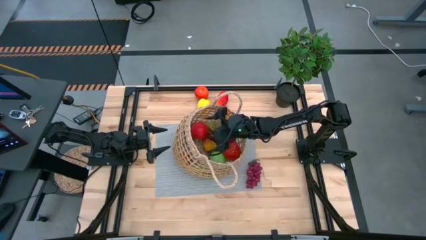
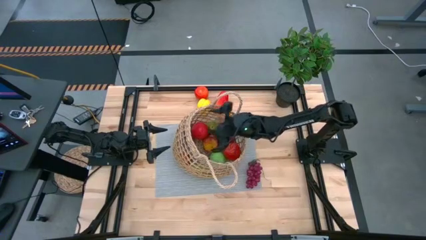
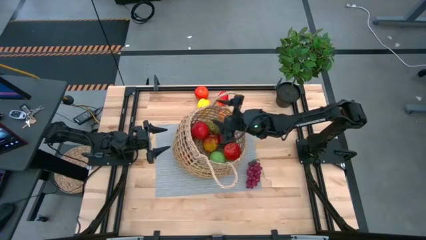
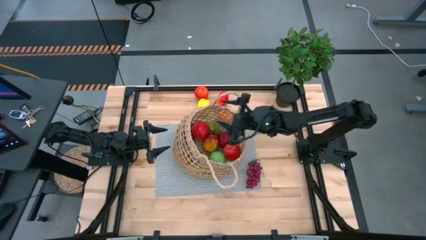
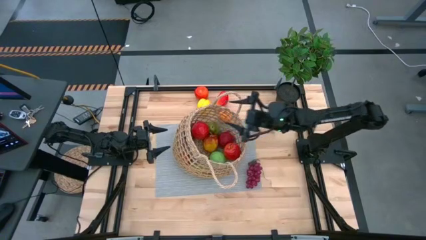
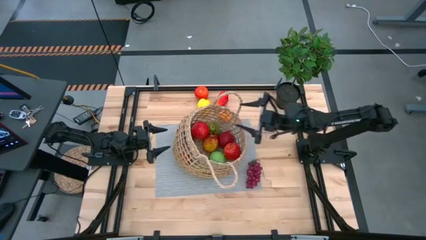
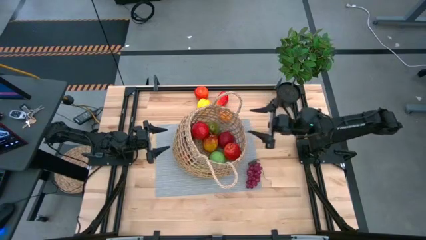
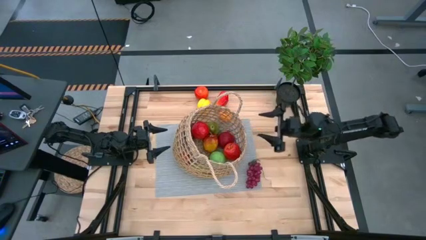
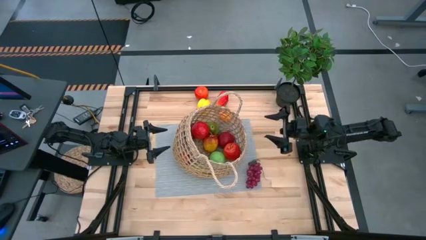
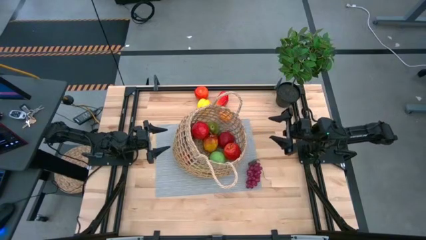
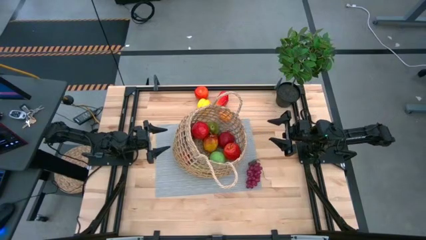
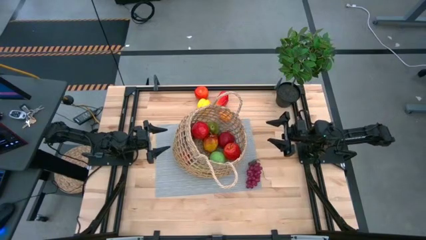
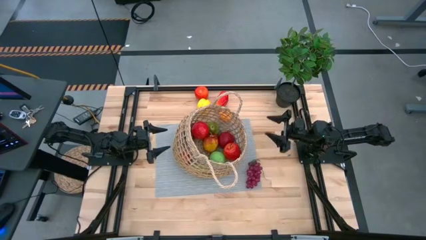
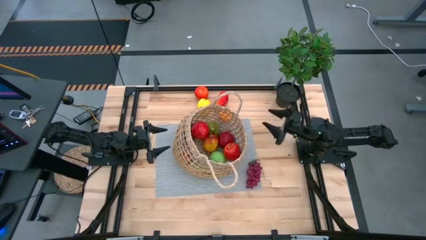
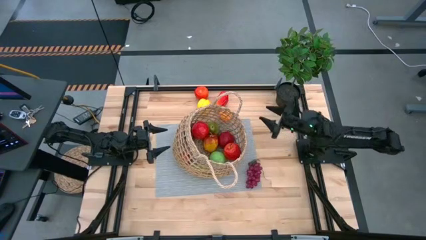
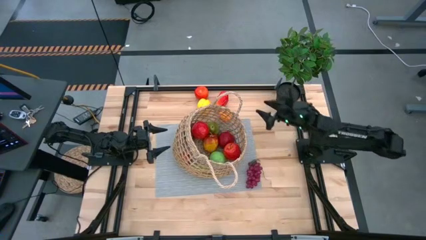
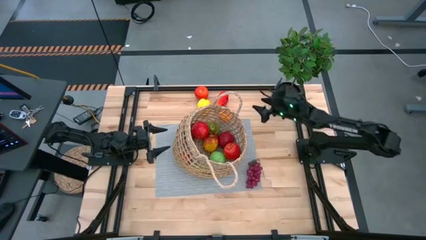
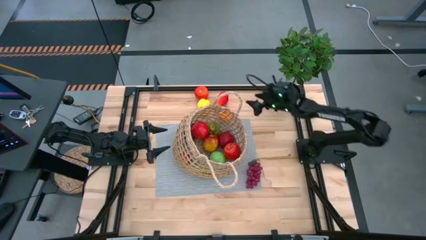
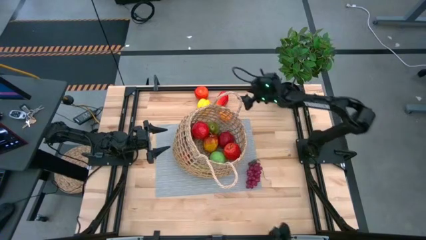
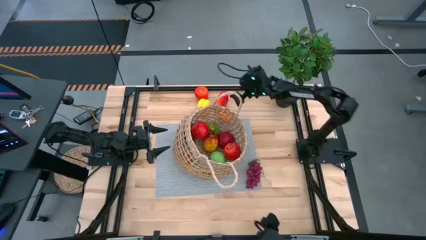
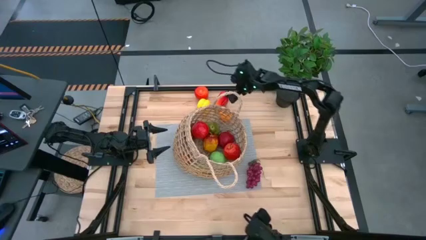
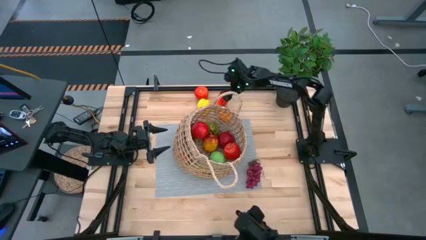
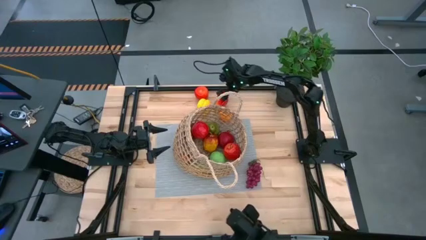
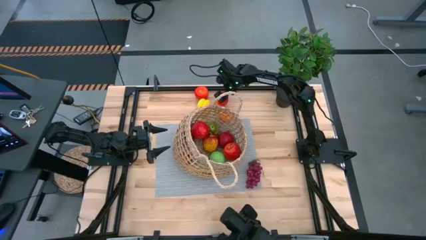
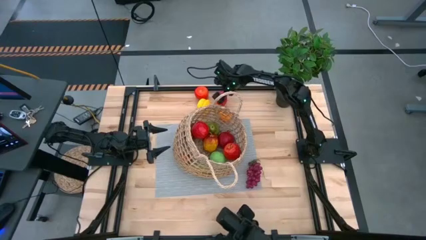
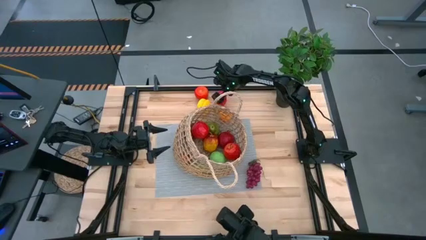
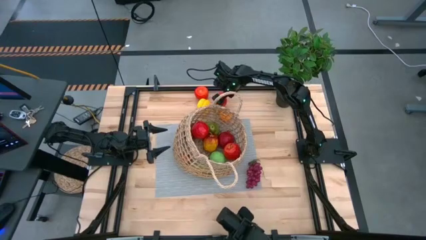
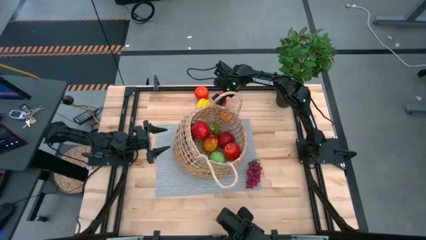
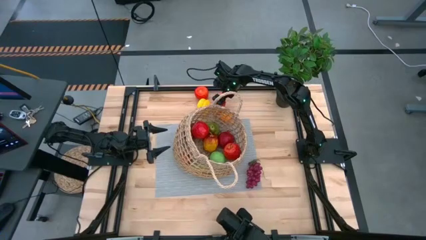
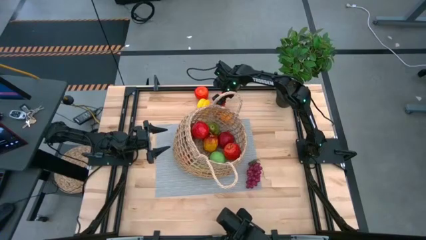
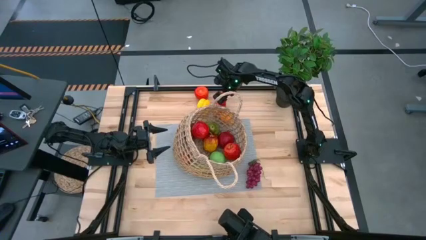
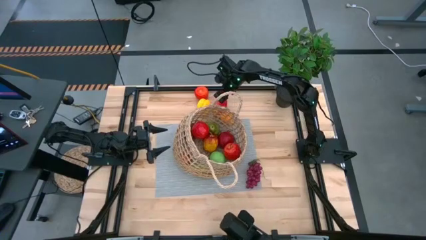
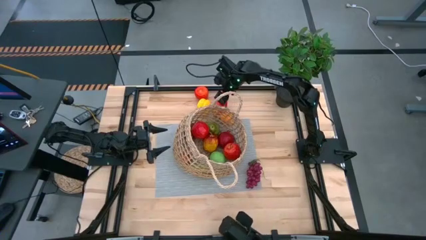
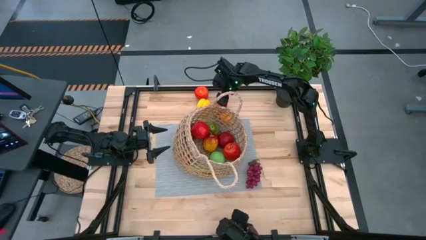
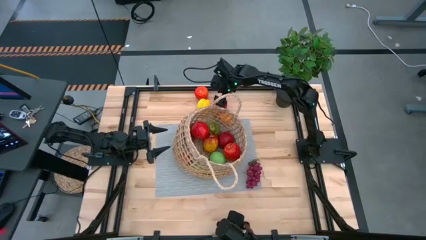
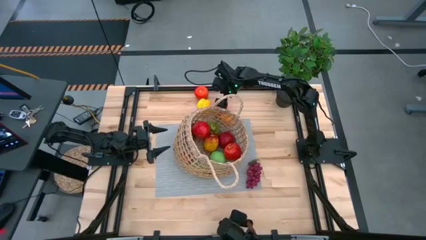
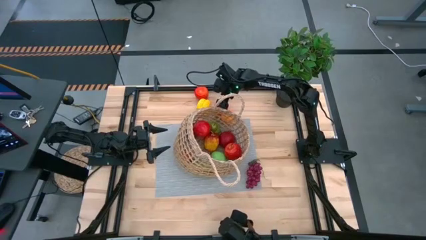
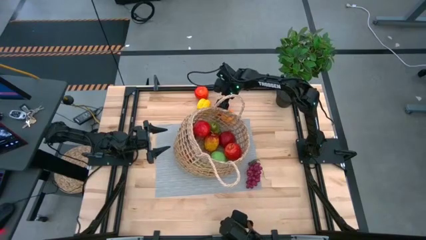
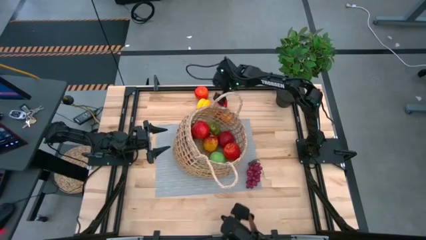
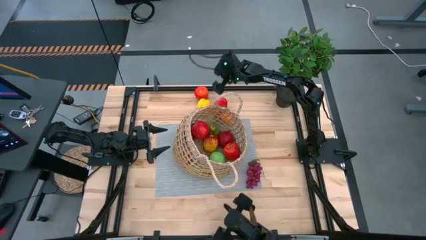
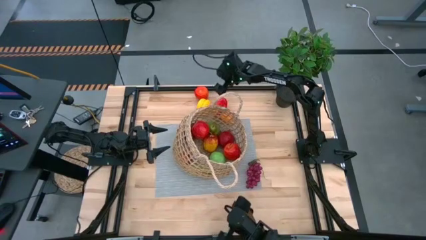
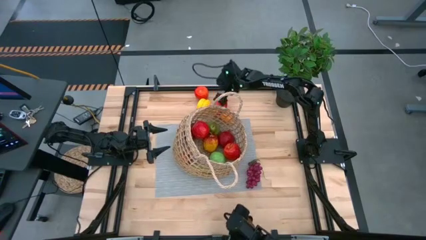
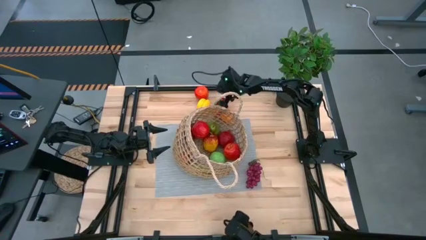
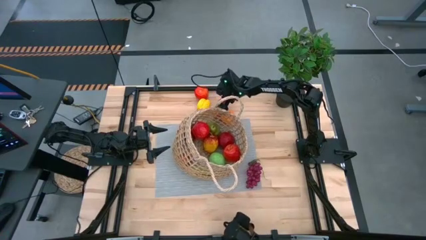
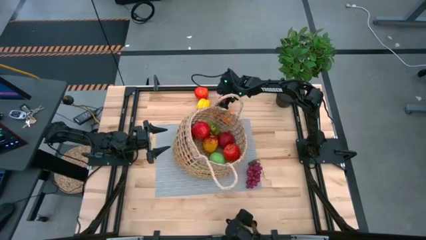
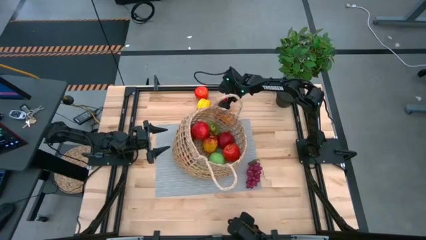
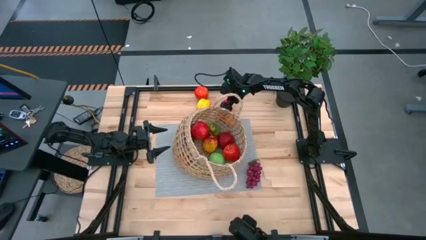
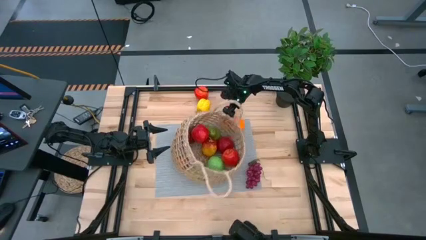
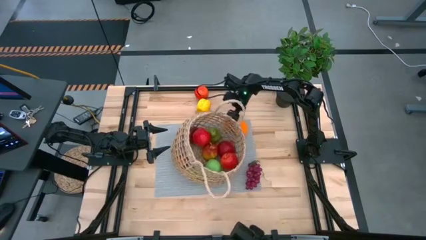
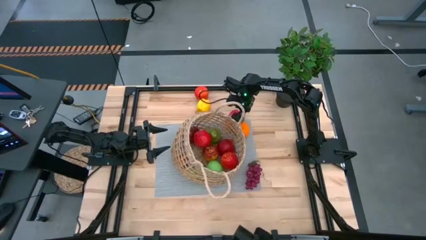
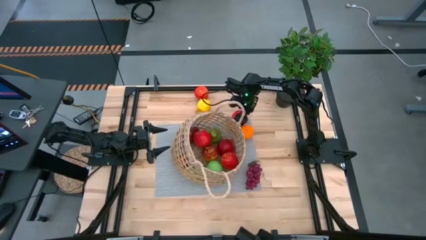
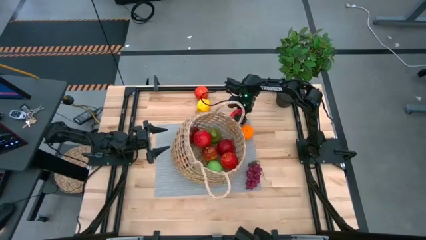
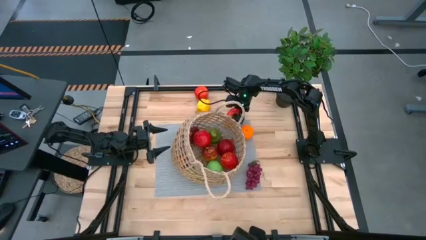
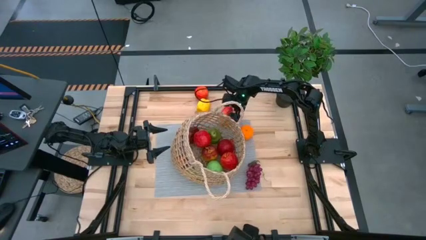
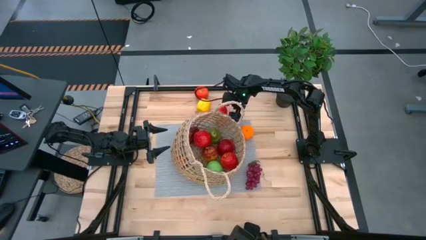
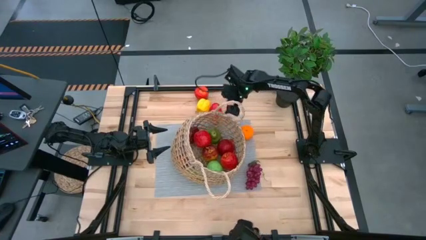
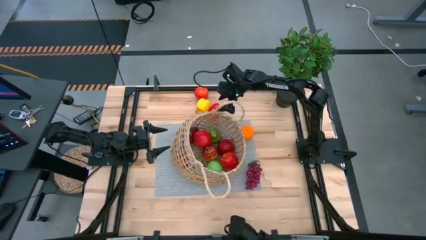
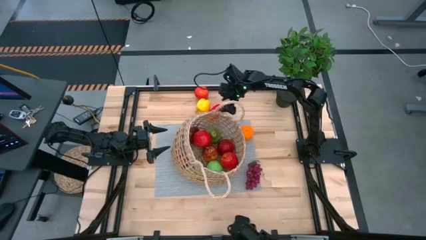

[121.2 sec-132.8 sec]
Task: Build produce basket
Put the red mango into the mesh basket

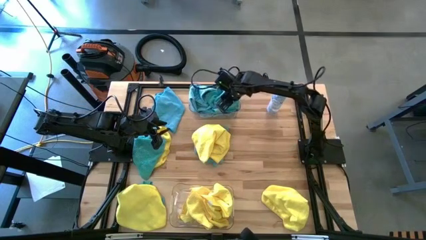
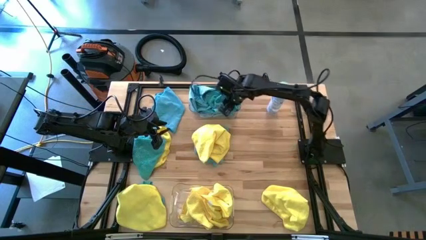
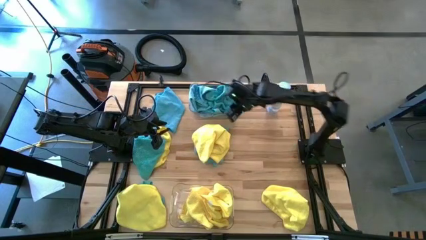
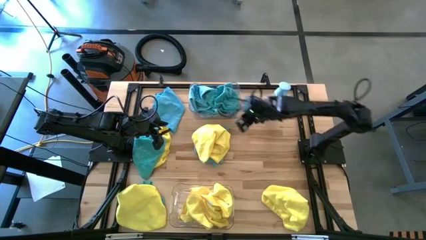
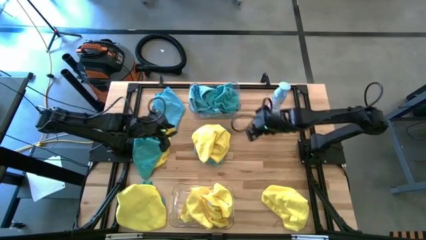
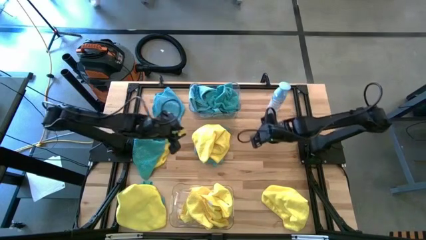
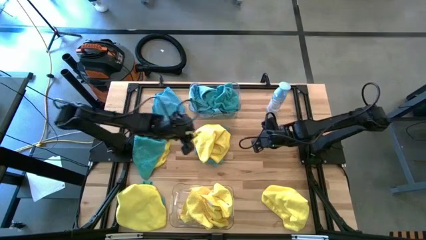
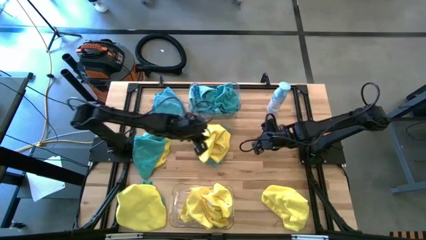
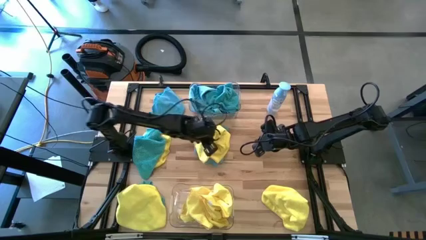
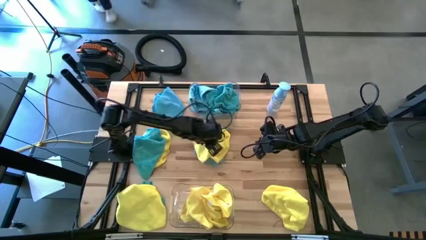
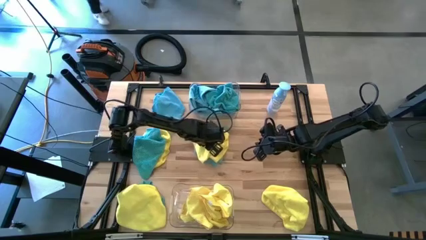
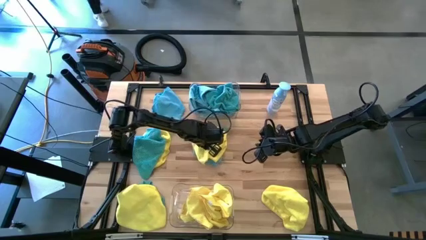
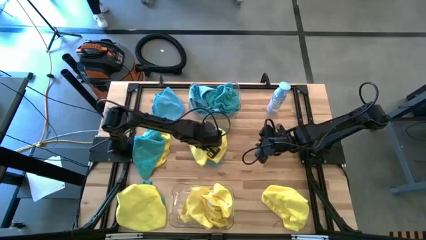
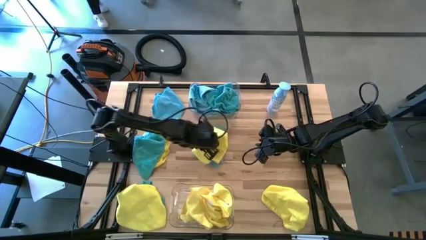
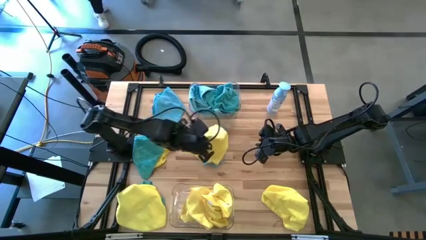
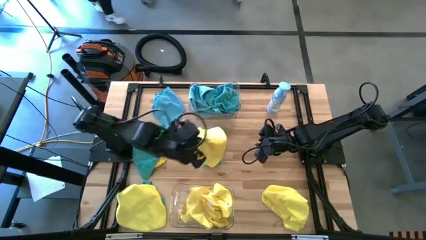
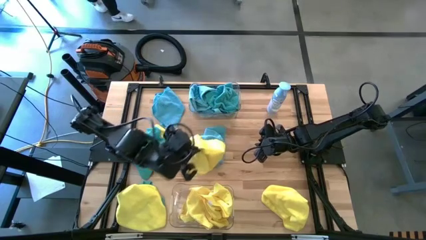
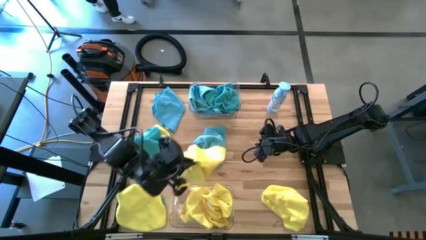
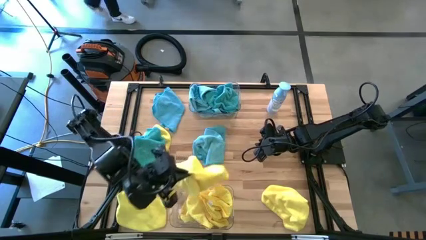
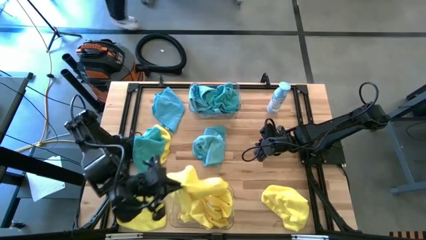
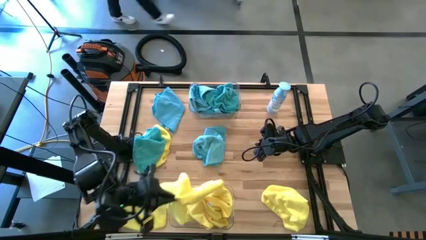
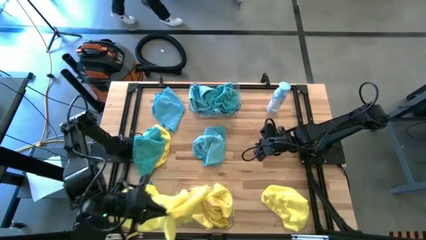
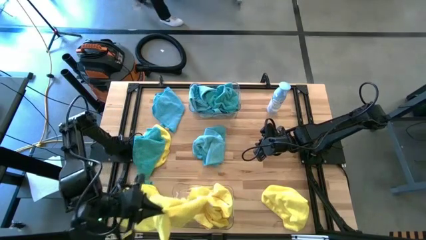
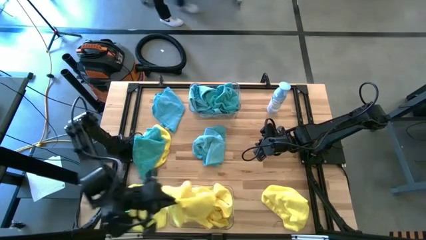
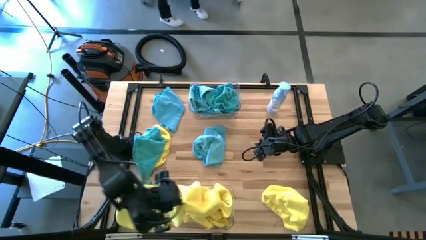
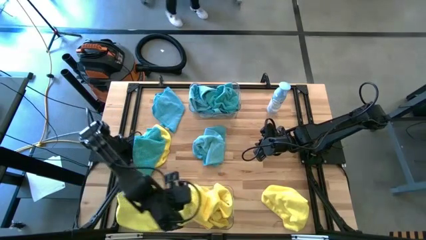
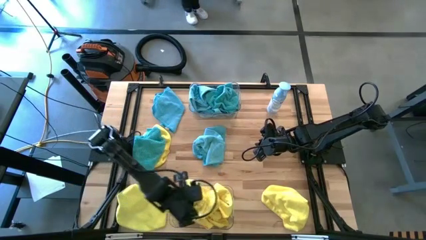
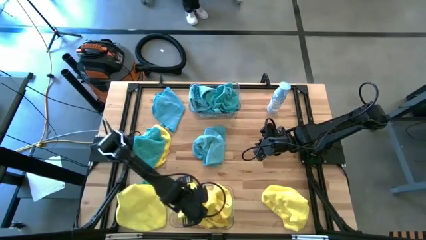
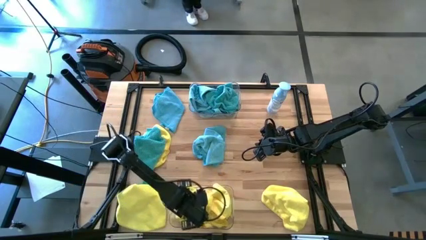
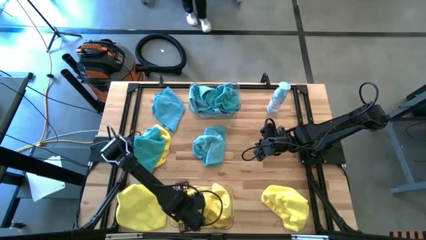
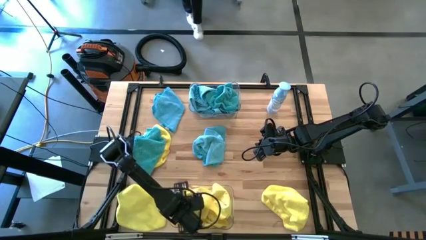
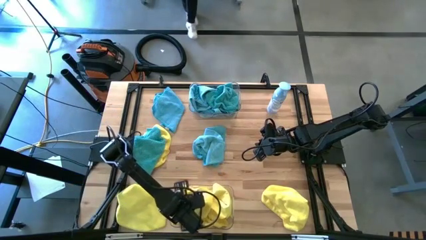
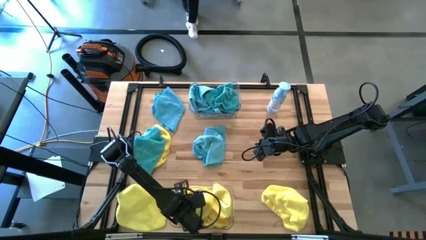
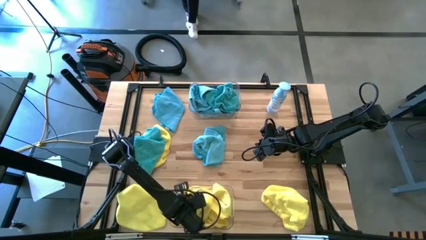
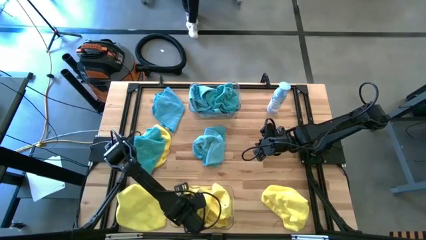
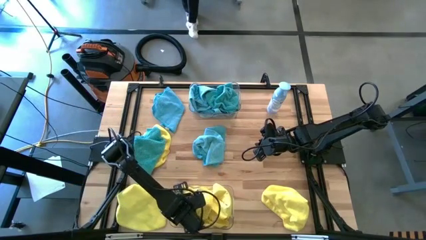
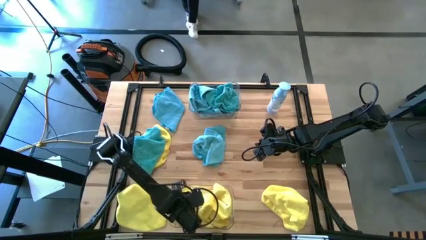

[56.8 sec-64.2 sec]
Task: Sort microfiber towel by color & place in baskets
Put the yellow microfiber towel into the bottom transparent bin
